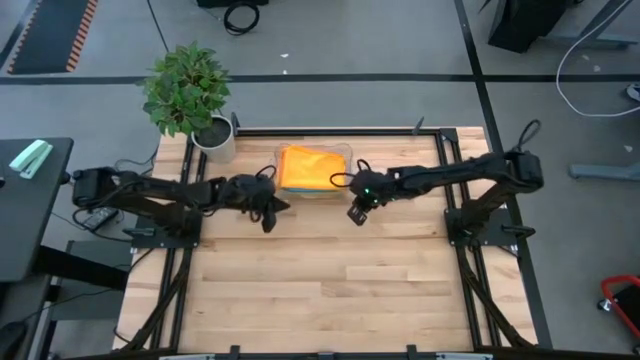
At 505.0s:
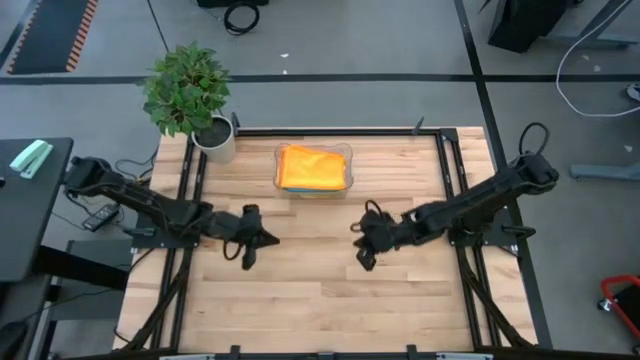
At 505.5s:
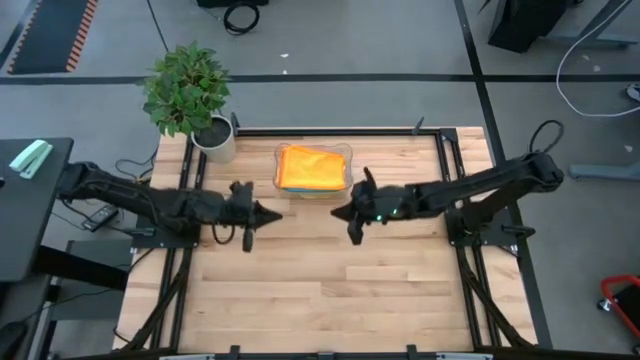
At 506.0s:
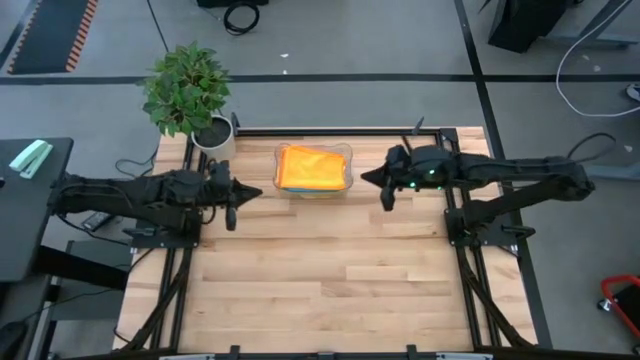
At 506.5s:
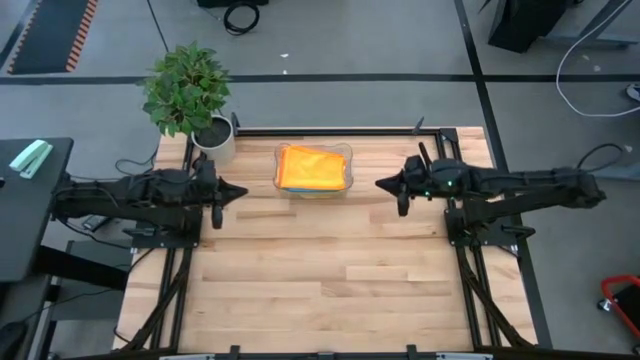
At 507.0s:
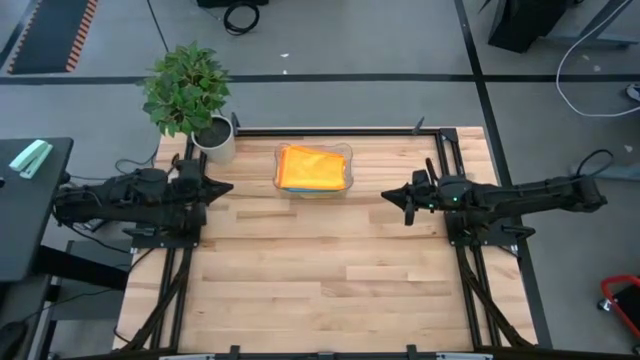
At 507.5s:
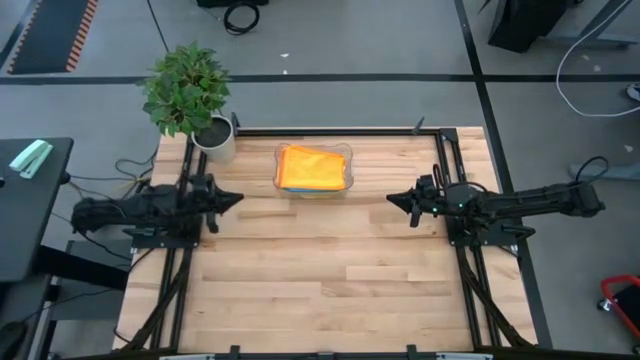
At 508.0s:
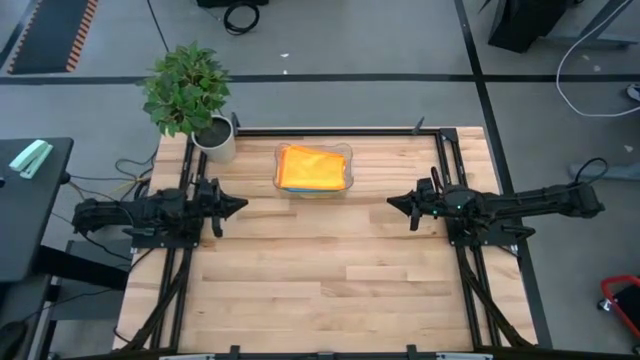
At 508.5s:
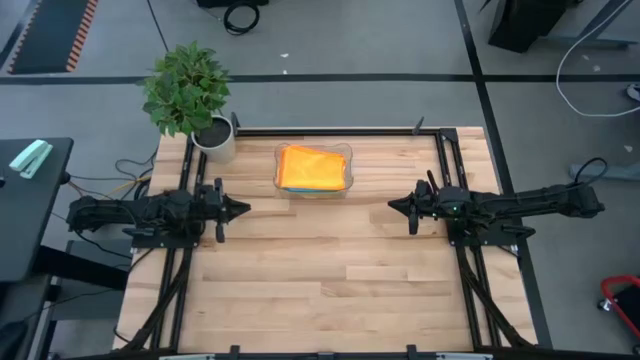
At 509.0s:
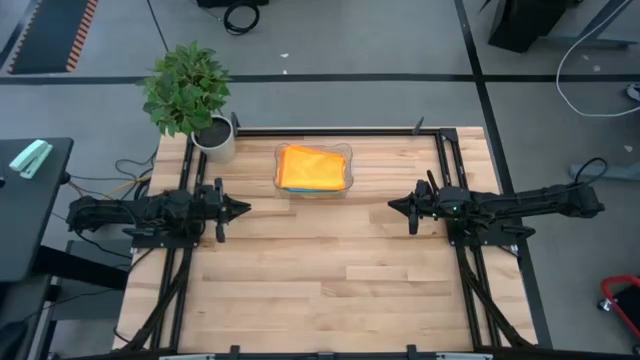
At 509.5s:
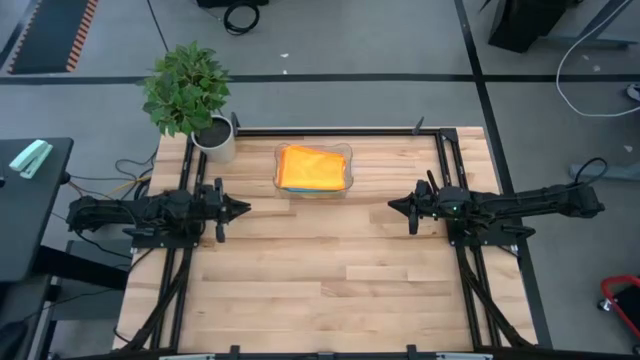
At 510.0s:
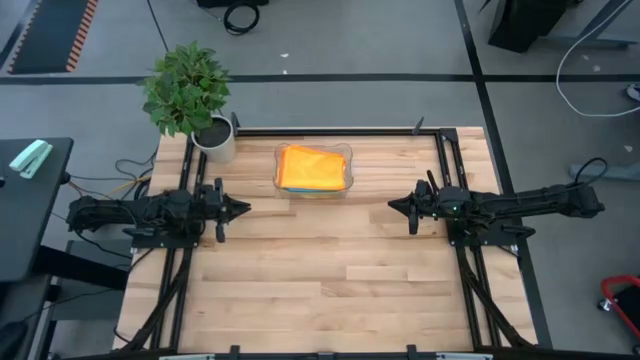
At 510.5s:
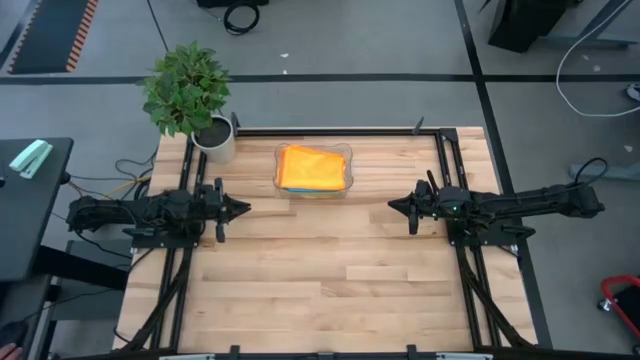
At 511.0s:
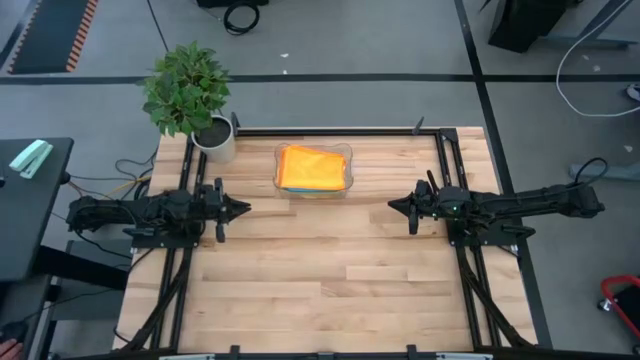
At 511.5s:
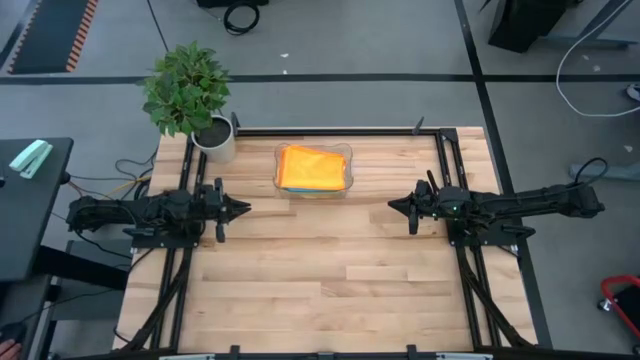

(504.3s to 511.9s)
Task: Fold microfiber towels
Return to Home Position

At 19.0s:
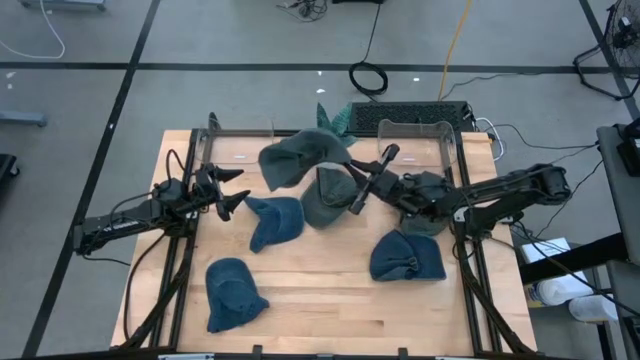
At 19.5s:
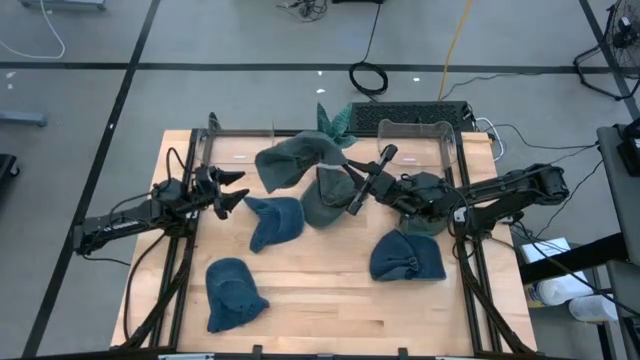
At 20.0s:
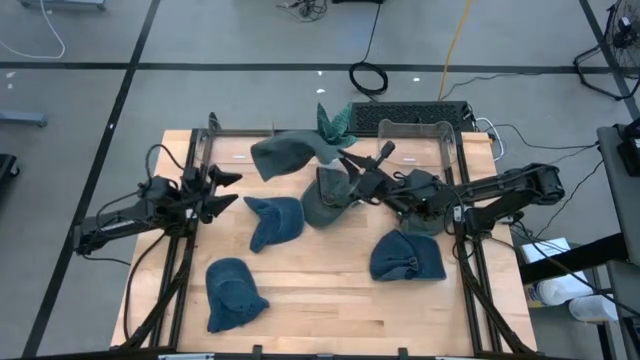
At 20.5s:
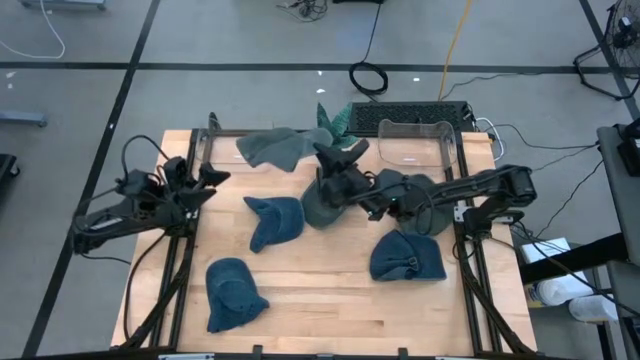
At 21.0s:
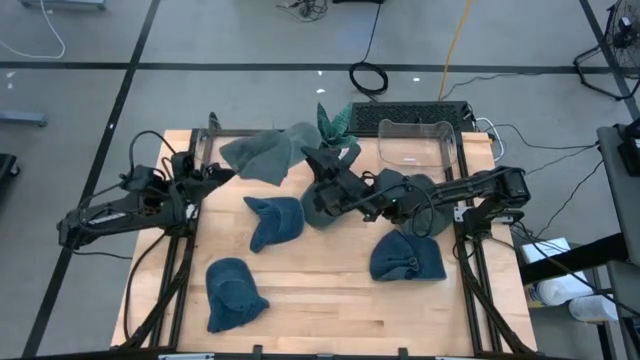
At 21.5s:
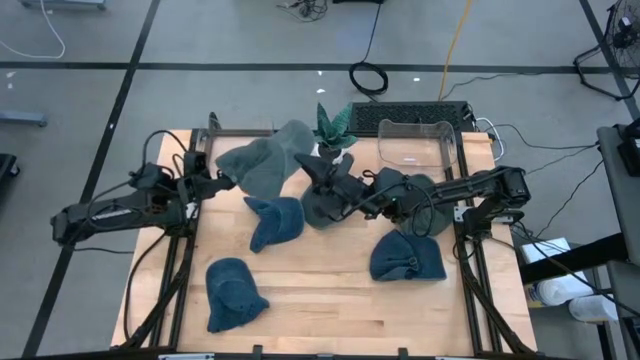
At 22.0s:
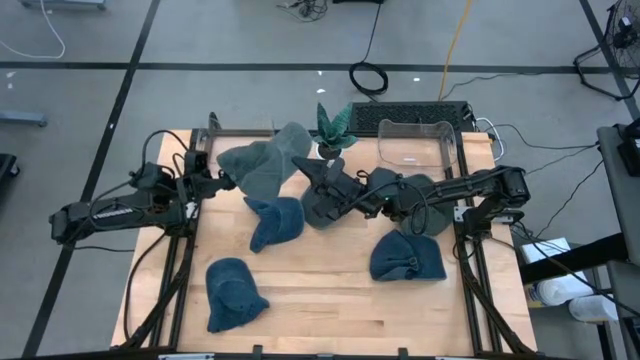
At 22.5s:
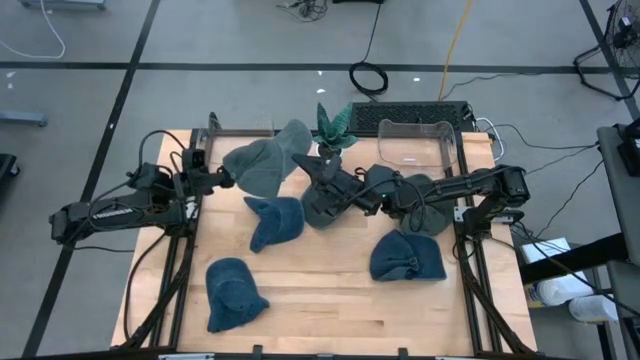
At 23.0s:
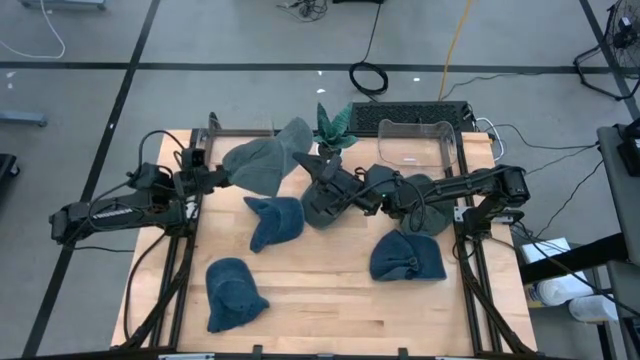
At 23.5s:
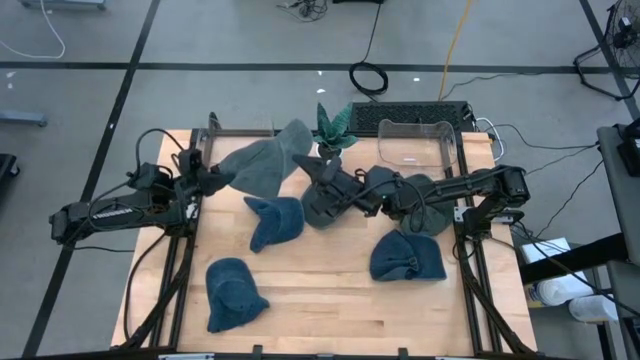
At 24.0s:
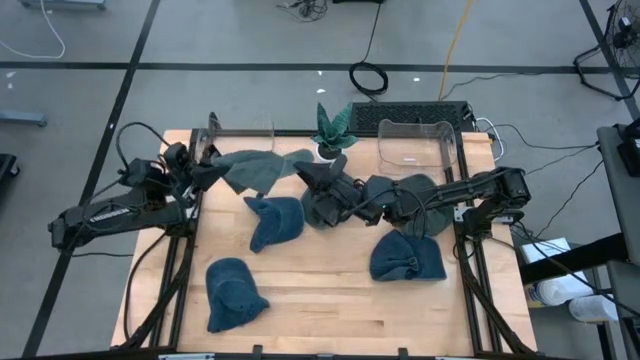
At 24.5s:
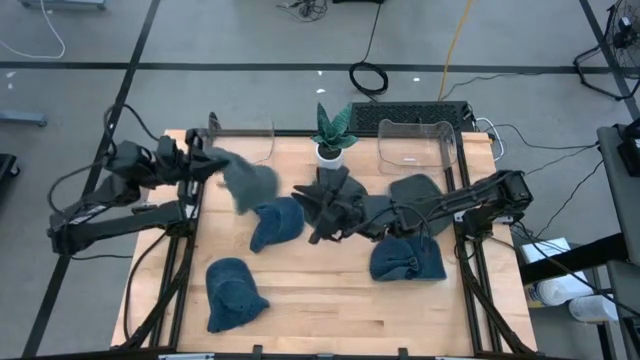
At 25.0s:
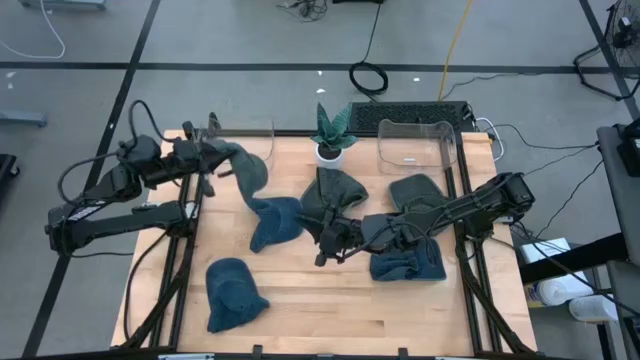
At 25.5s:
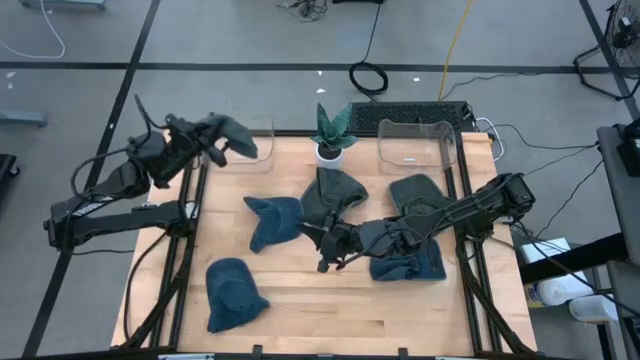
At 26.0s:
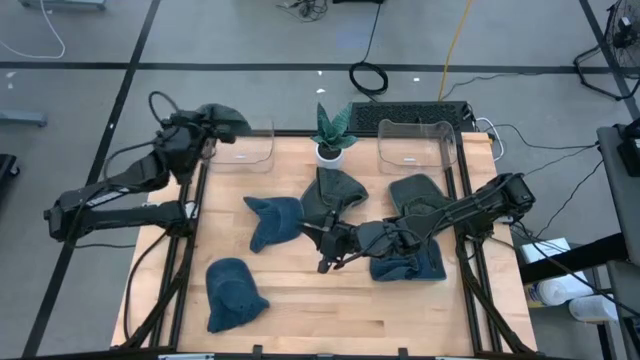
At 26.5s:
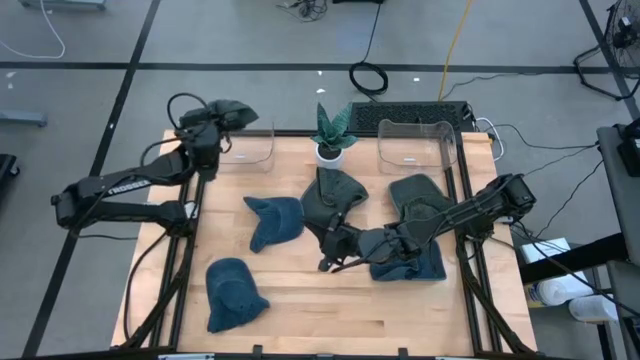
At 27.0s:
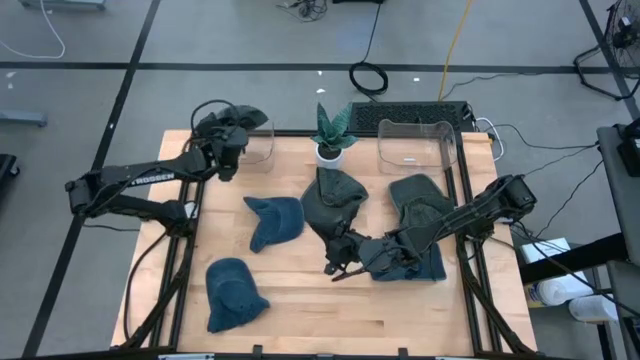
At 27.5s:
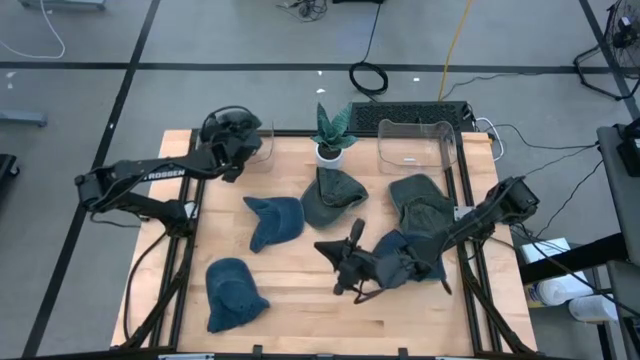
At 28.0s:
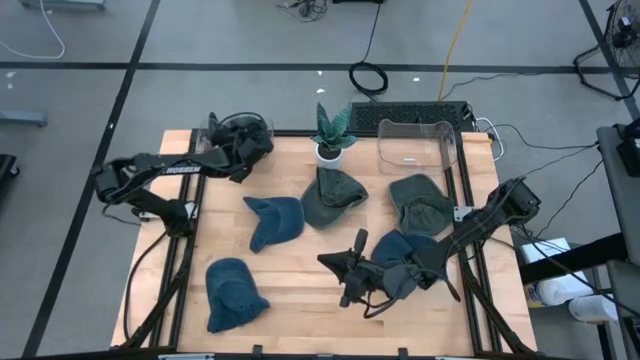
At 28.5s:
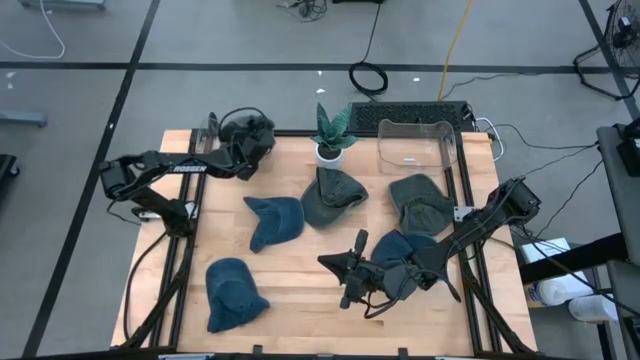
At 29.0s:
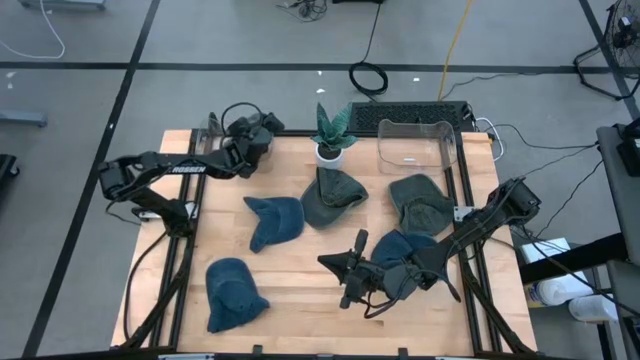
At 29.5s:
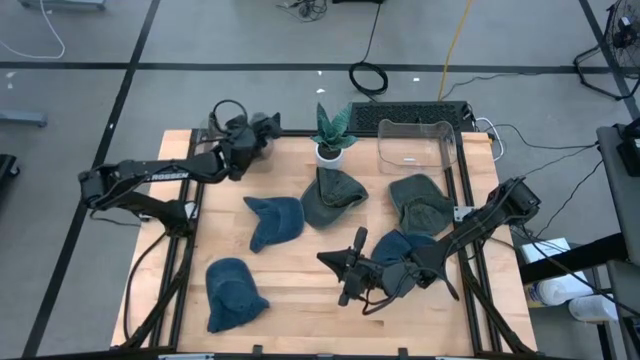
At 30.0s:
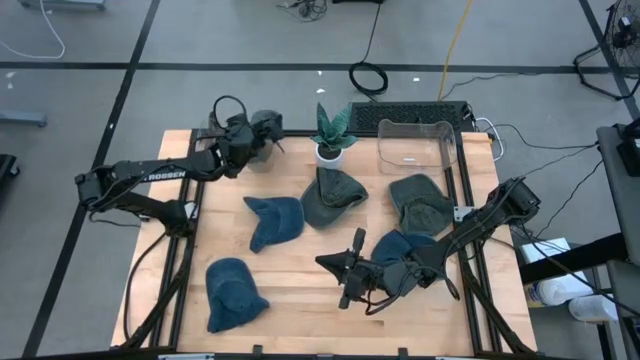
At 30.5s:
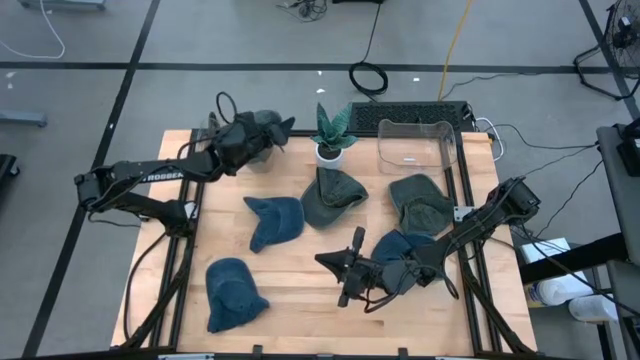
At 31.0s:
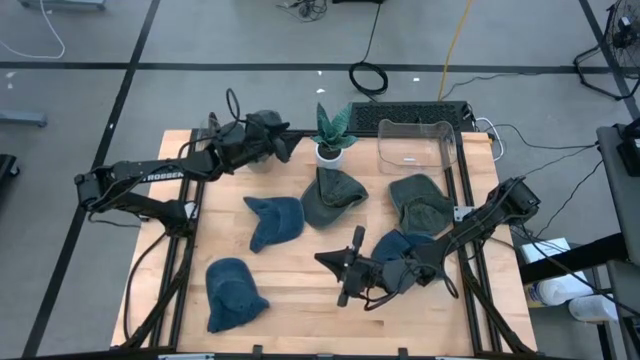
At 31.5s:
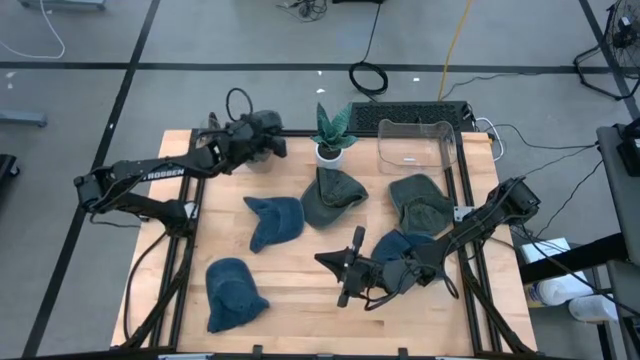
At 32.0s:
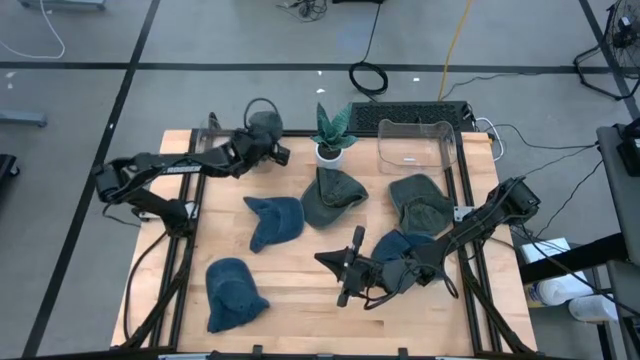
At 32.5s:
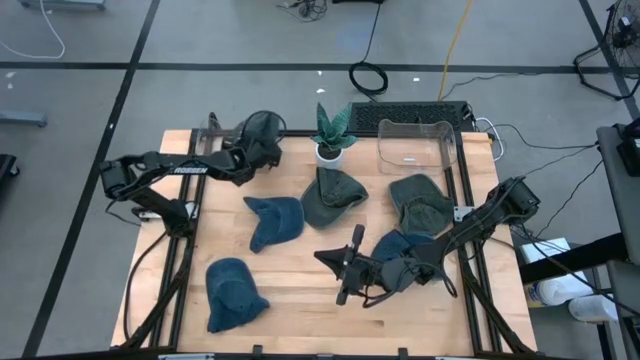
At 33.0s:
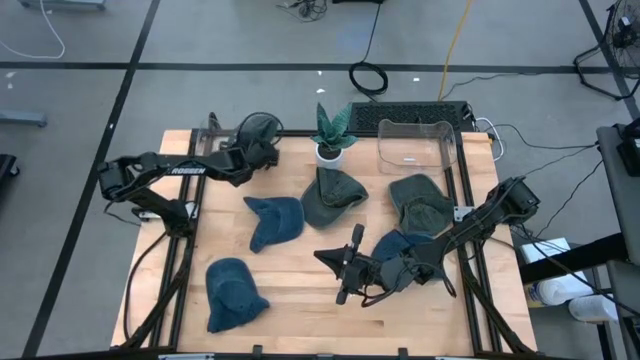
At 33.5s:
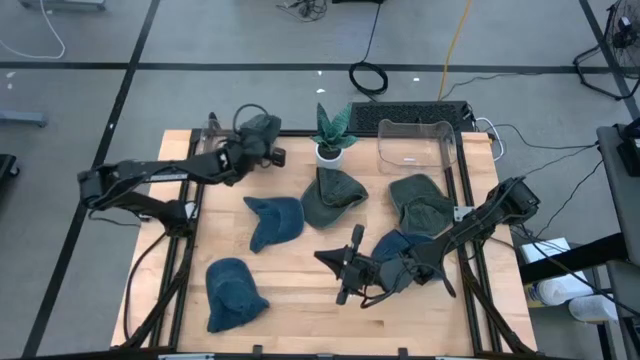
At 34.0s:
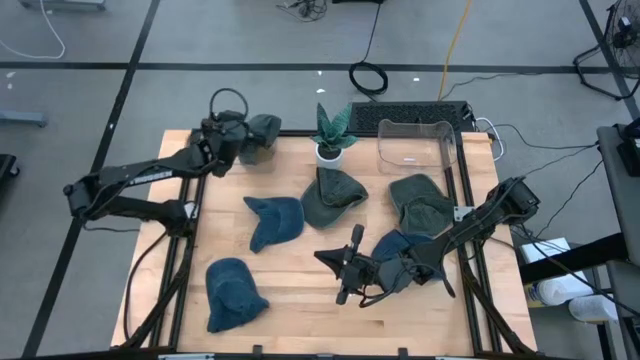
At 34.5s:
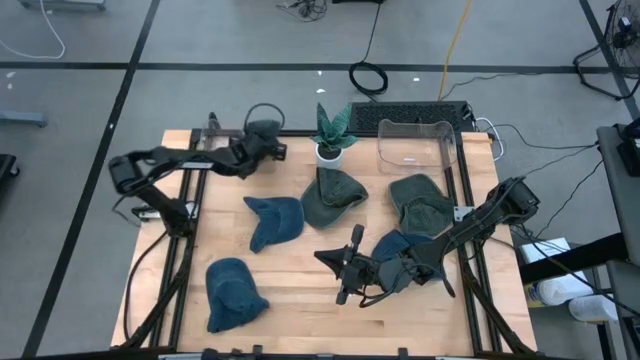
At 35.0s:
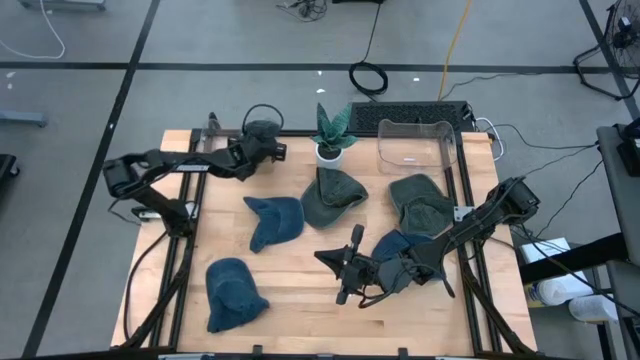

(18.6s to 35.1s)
Task: Pick & Place hat
Put the bottom right green cap into the left transparent bin
